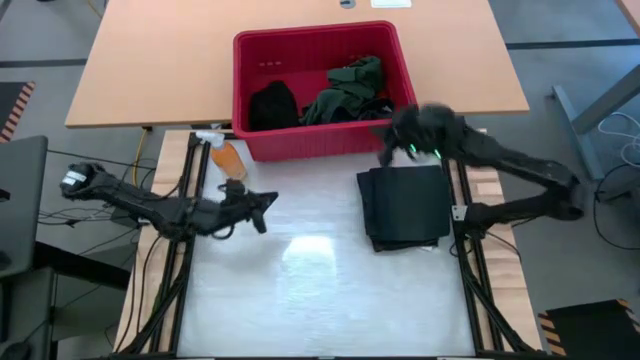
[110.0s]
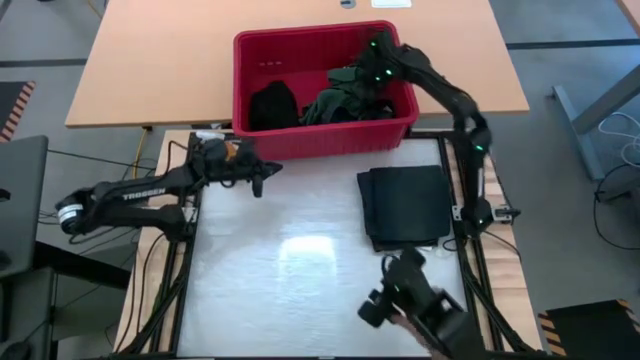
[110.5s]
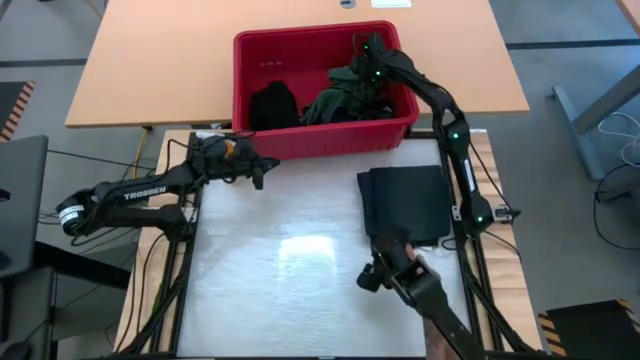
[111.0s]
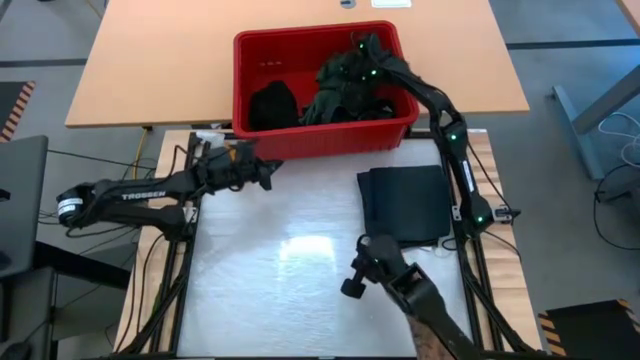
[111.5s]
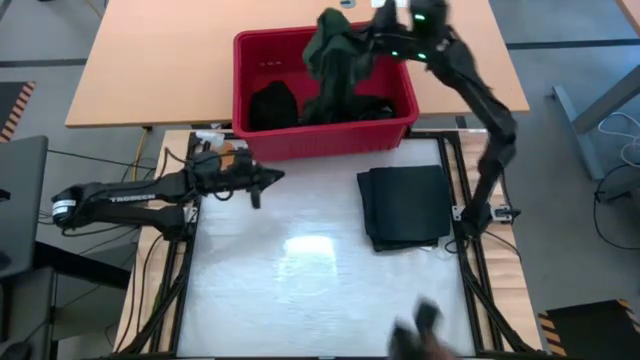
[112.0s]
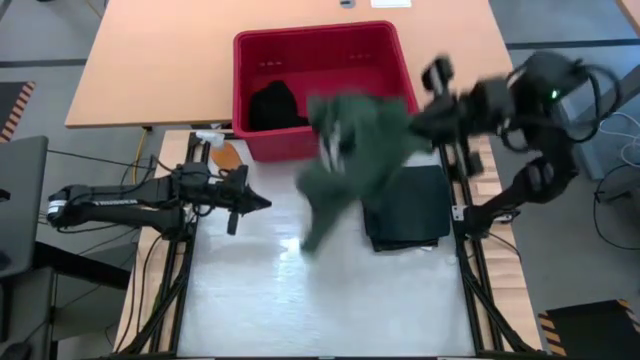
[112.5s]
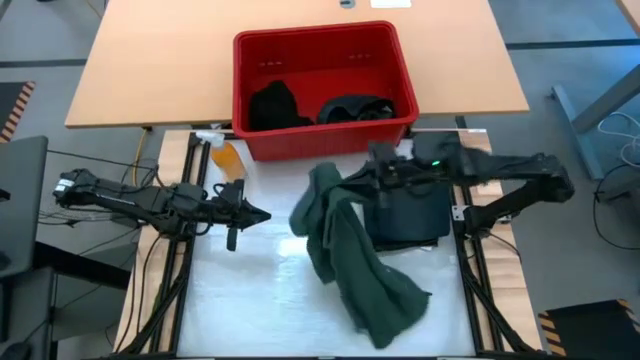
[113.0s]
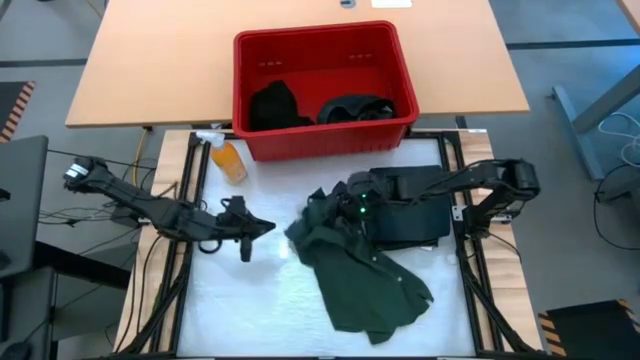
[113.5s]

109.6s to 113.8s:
Task: Fold Laundry from Bin
Remove the green polo shirt from the red bin

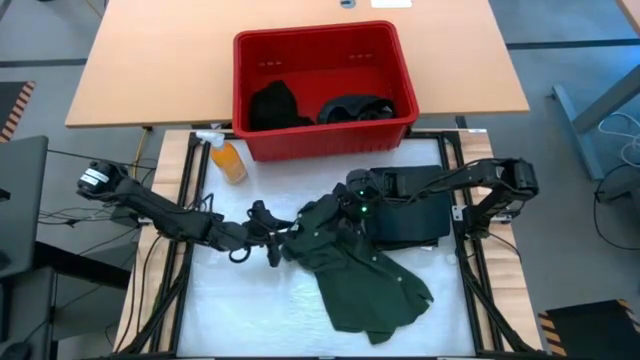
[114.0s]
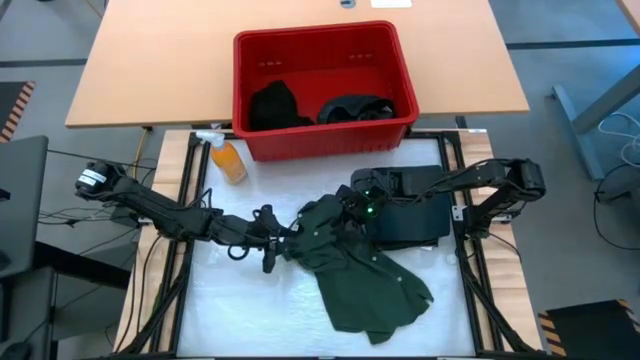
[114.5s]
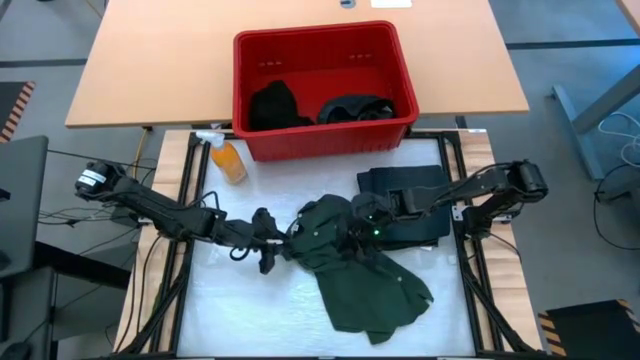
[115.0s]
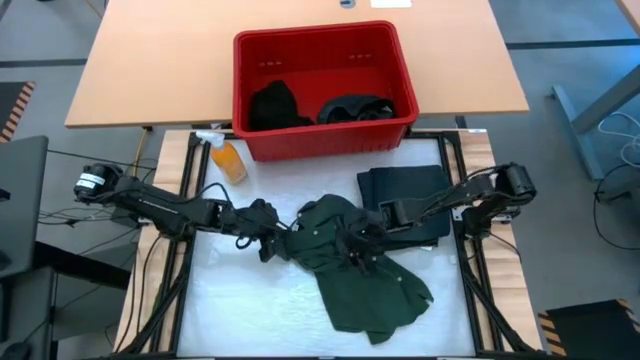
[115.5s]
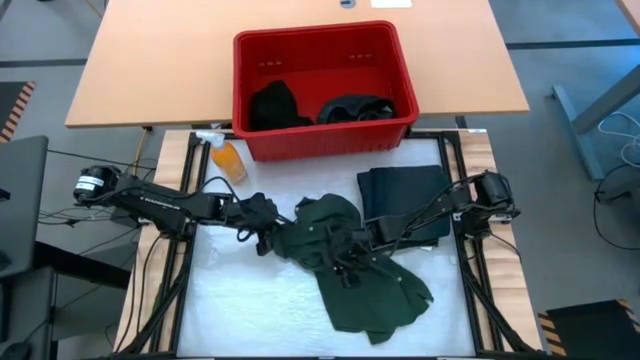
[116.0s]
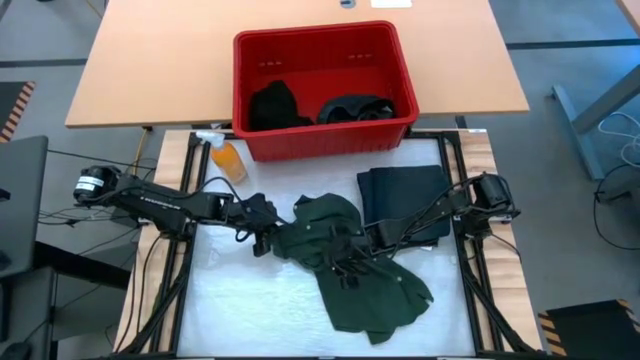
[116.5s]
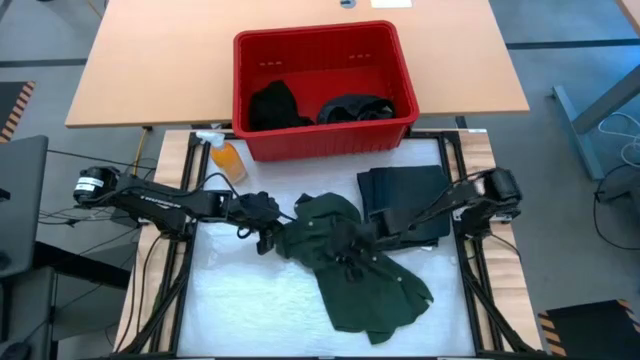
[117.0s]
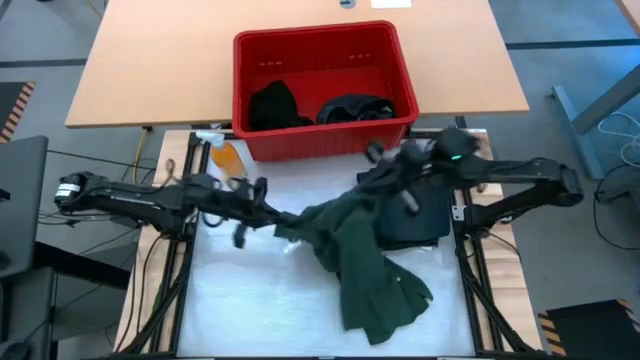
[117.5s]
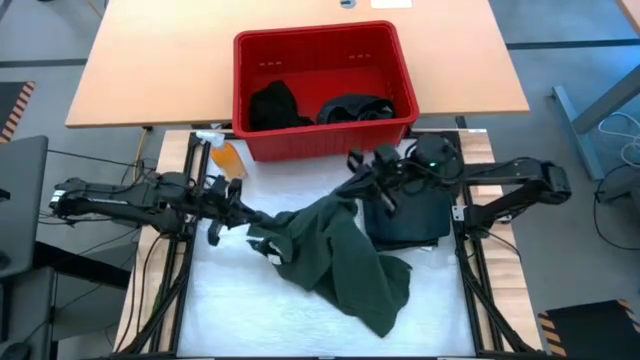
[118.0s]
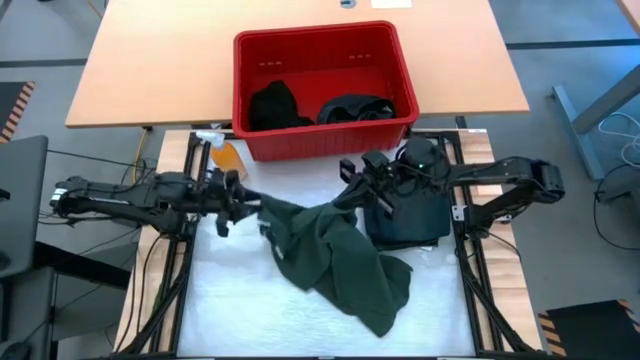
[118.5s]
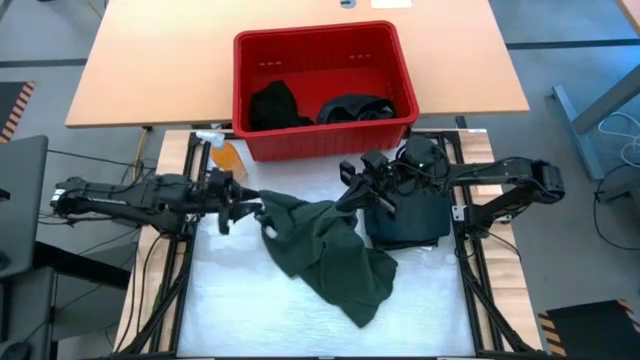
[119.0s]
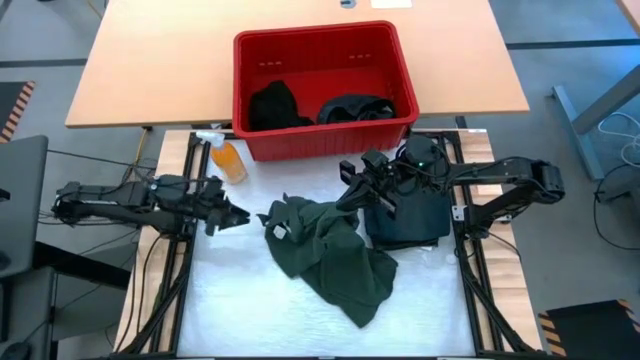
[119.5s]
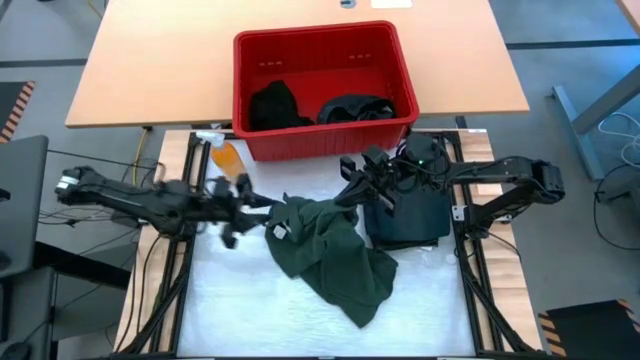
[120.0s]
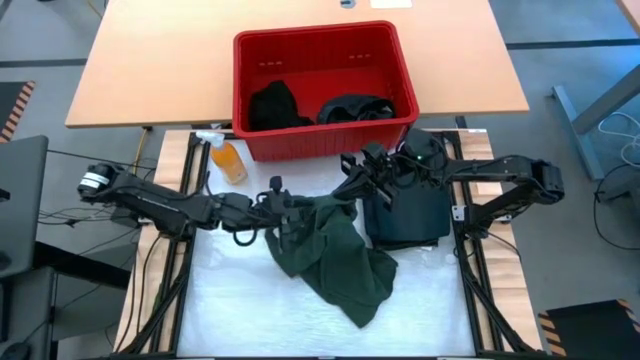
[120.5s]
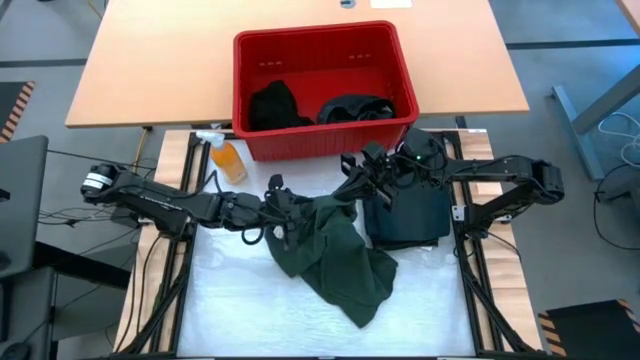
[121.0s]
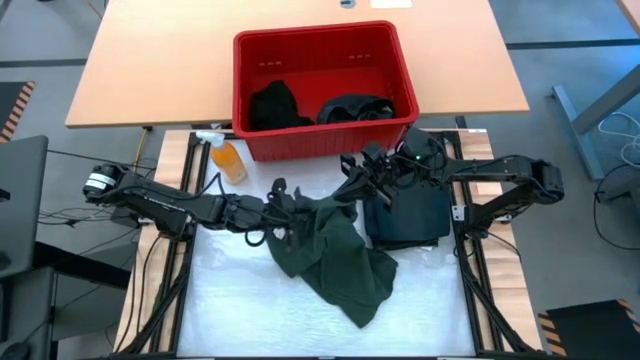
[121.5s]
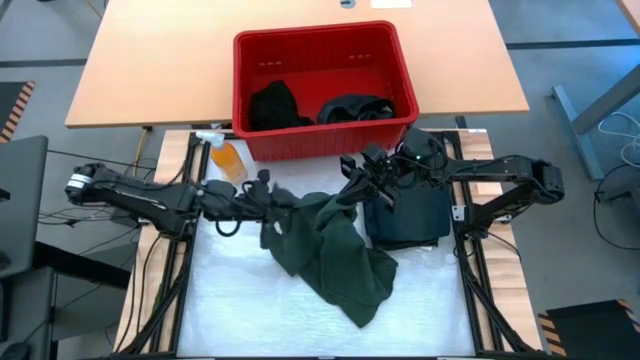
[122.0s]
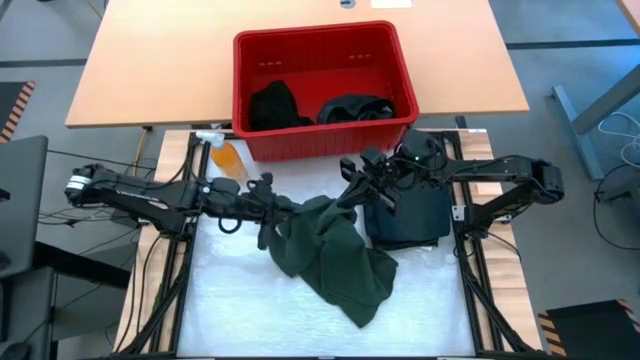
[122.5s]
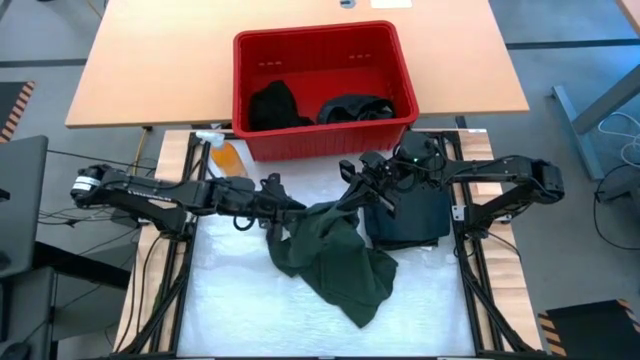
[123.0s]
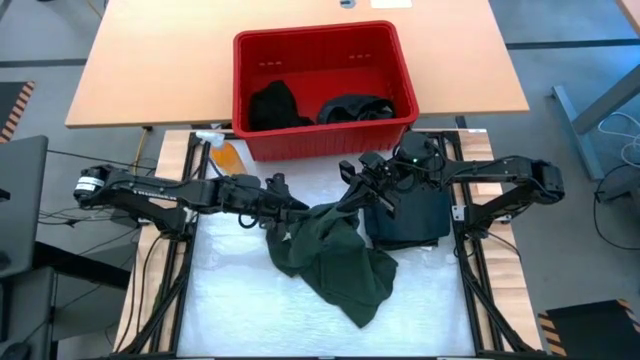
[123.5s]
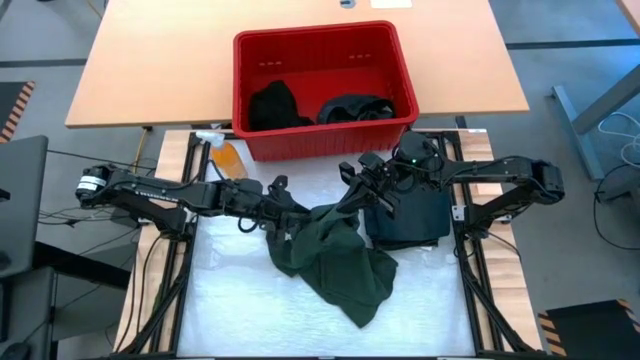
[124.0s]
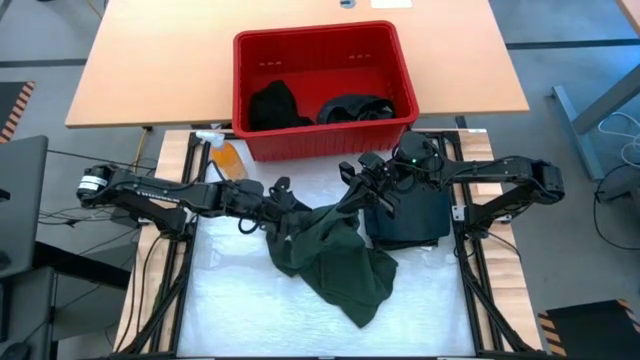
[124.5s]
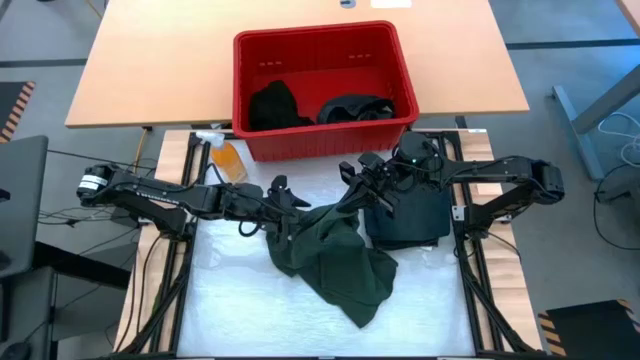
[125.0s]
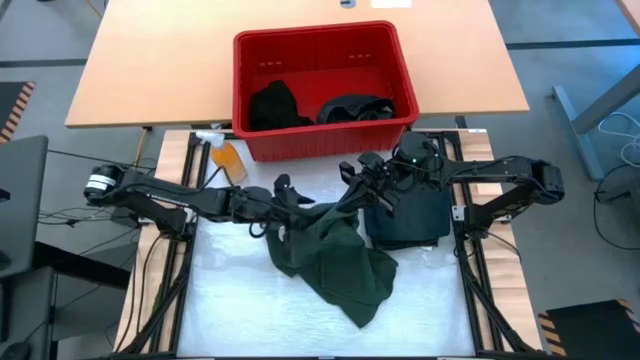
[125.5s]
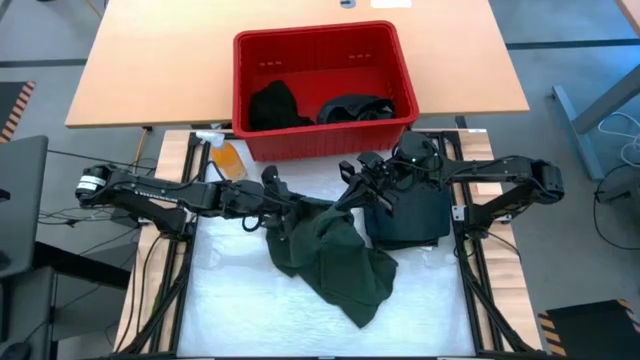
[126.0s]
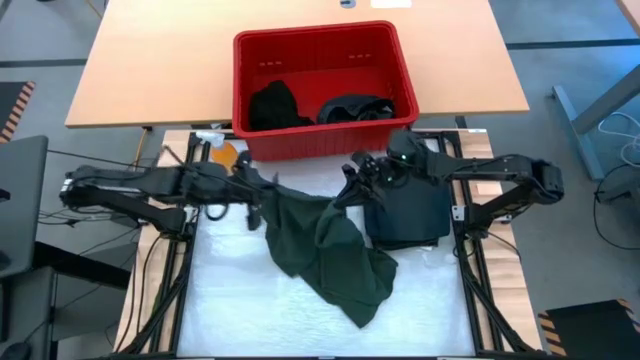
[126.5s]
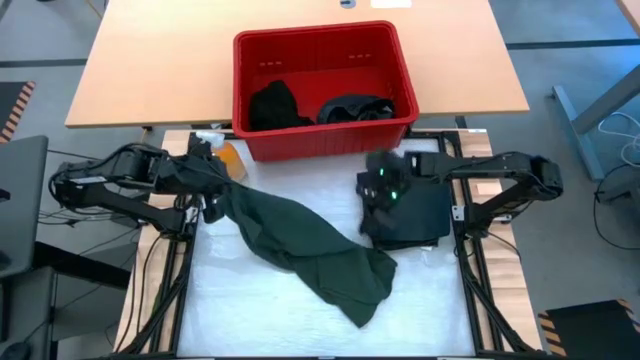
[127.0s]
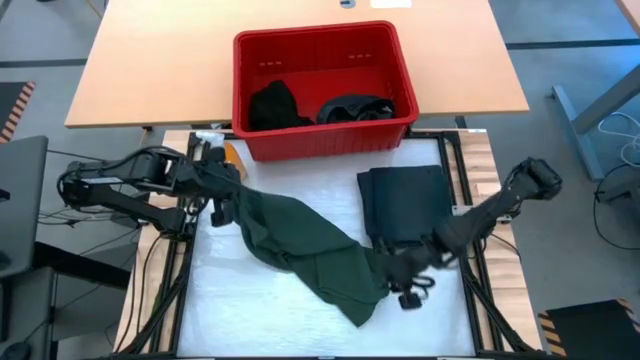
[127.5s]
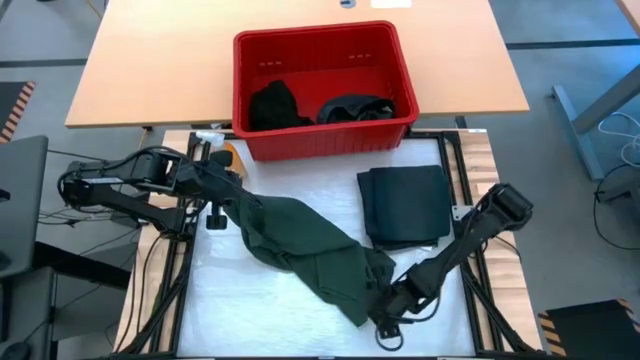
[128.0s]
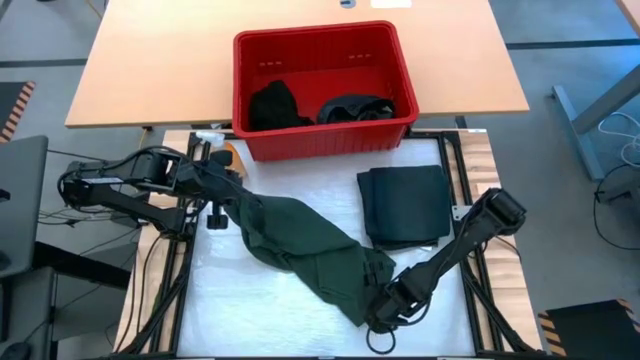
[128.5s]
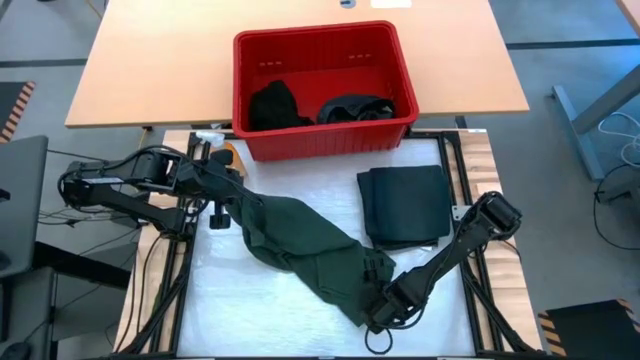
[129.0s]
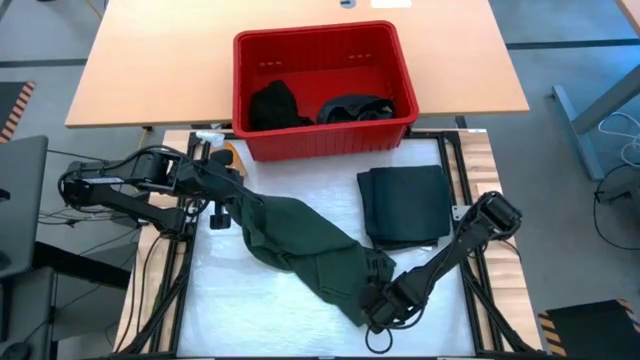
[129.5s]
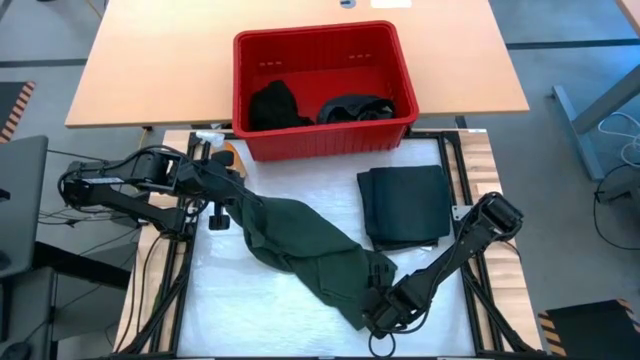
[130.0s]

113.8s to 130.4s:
Fold the green polo shirt

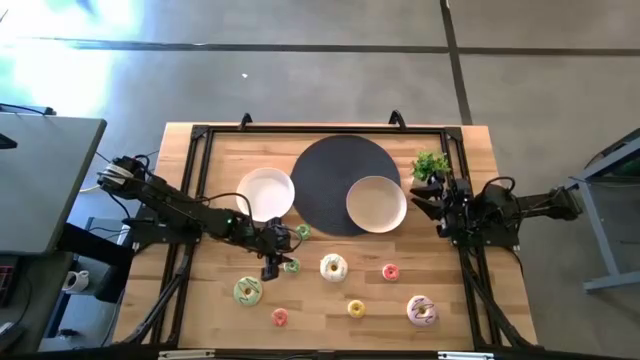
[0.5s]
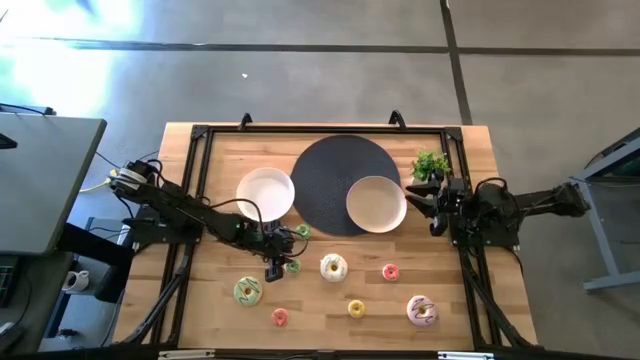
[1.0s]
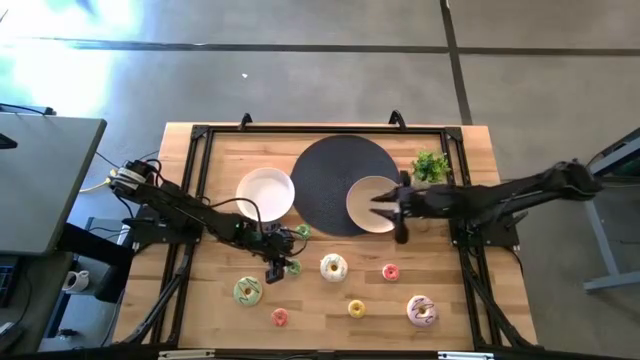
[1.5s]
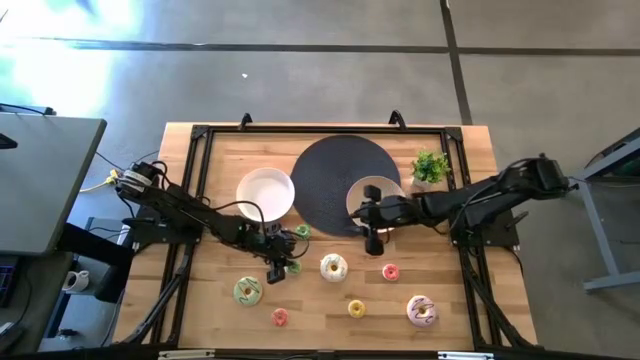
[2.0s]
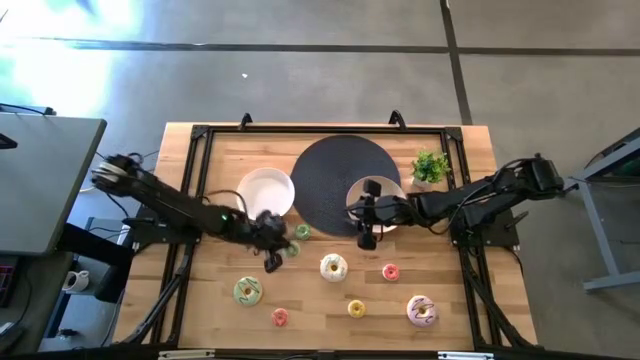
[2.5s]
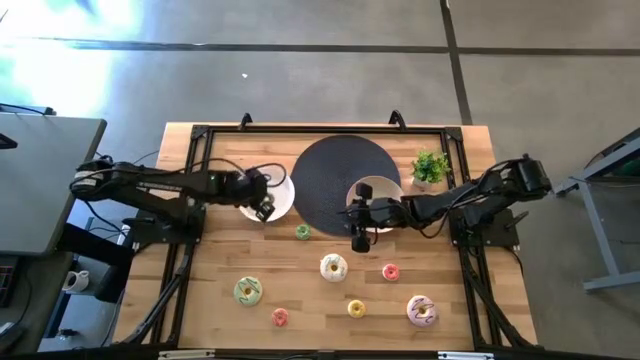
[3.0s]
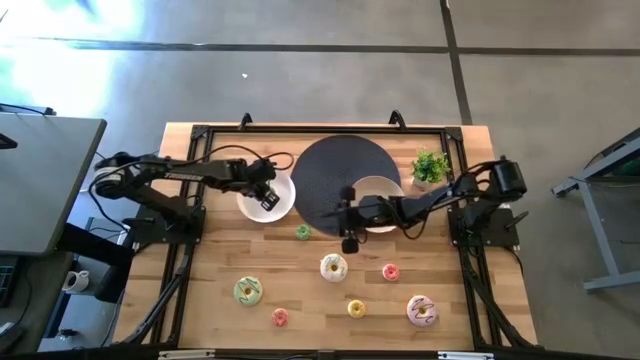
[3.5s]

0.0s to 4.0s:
Task: Pick & Place donuts
Put the bottom small green donut into the white plate
